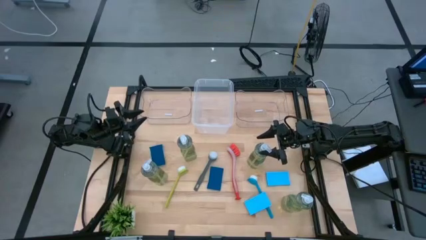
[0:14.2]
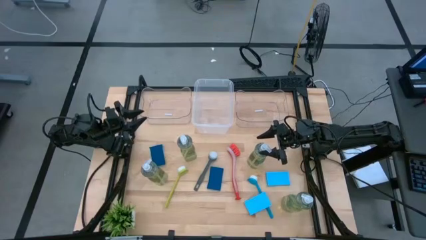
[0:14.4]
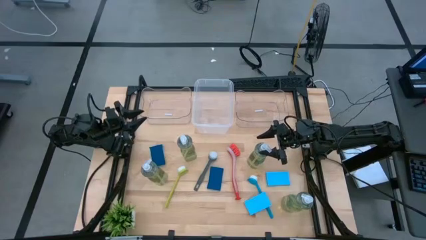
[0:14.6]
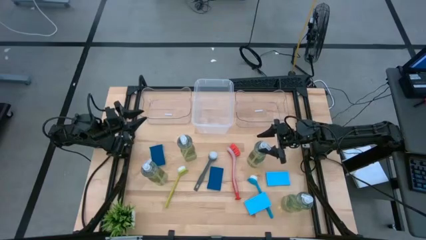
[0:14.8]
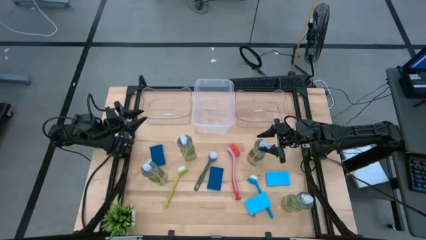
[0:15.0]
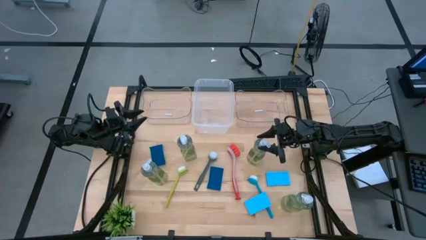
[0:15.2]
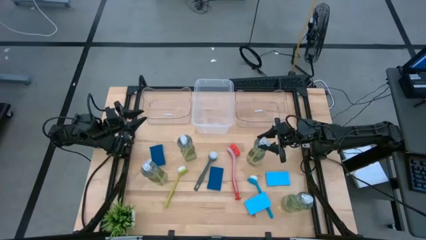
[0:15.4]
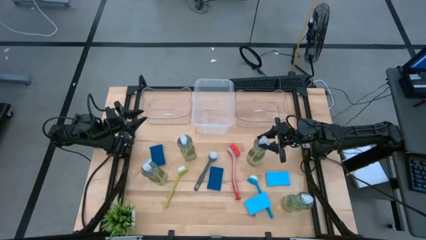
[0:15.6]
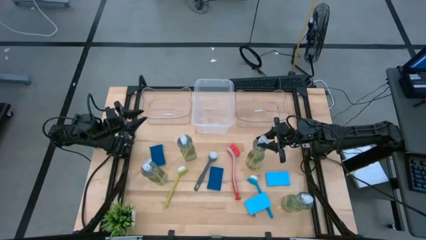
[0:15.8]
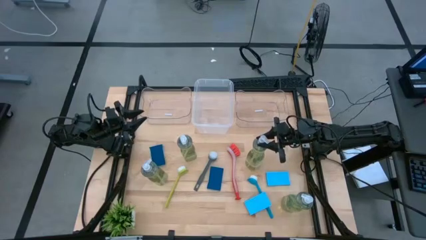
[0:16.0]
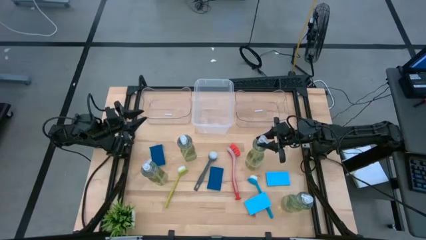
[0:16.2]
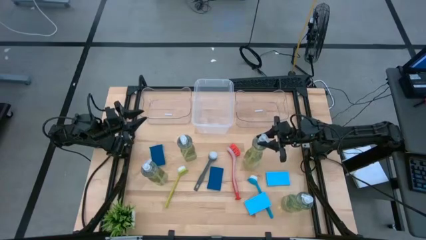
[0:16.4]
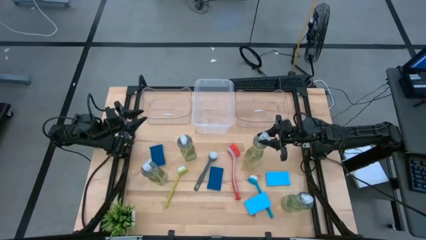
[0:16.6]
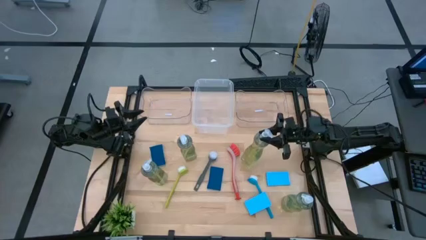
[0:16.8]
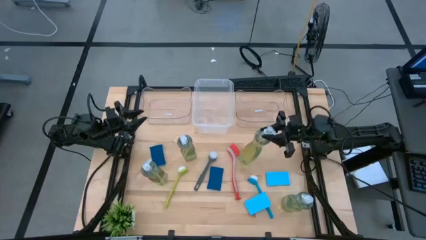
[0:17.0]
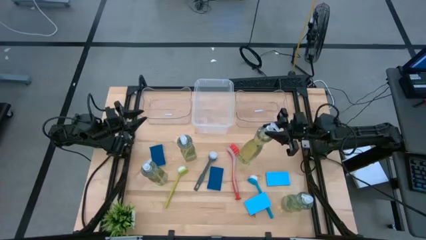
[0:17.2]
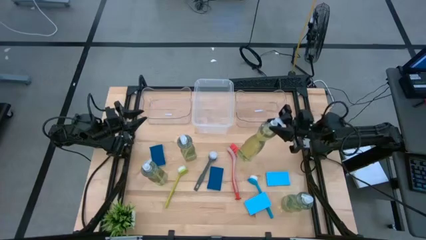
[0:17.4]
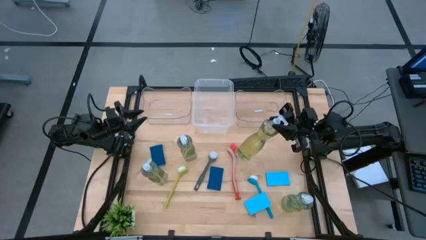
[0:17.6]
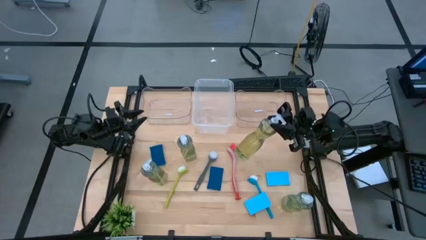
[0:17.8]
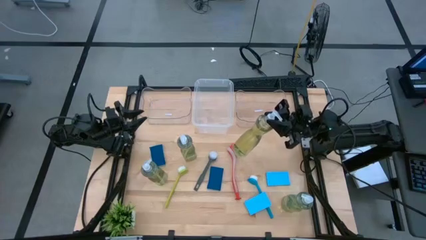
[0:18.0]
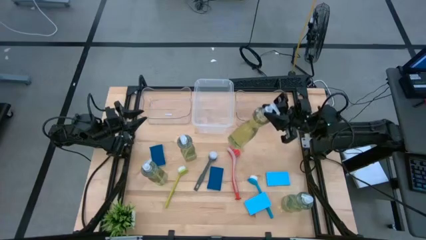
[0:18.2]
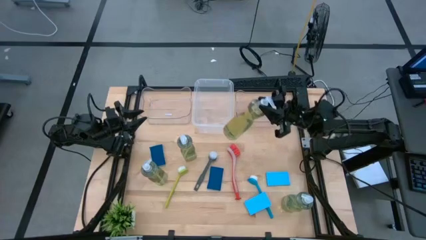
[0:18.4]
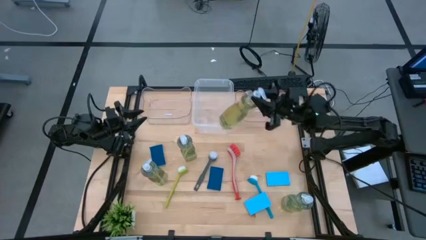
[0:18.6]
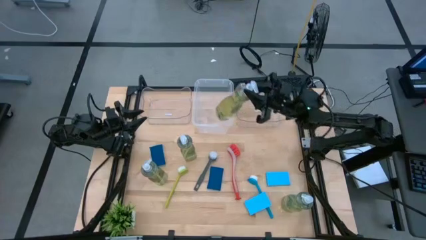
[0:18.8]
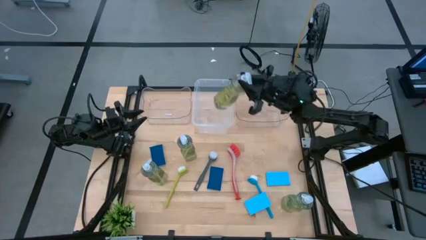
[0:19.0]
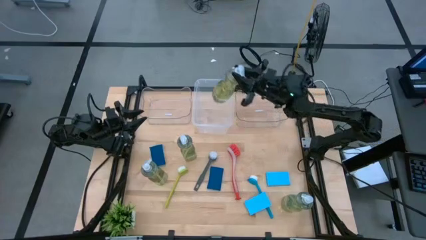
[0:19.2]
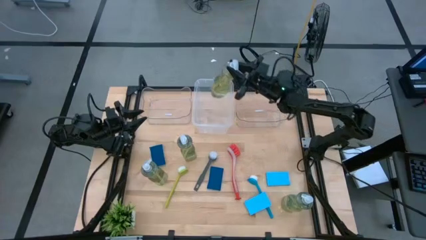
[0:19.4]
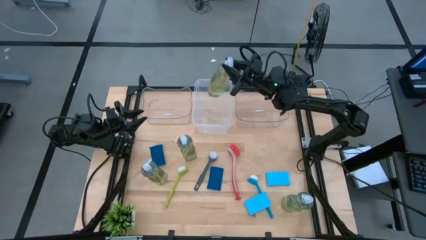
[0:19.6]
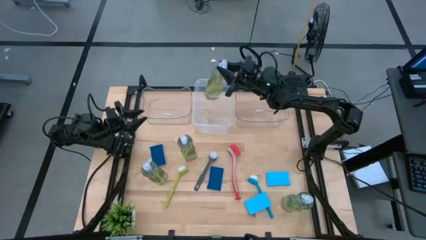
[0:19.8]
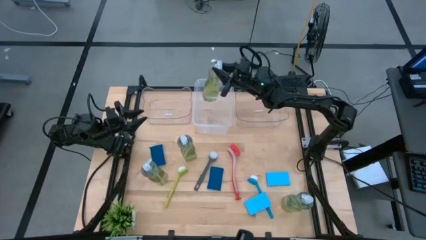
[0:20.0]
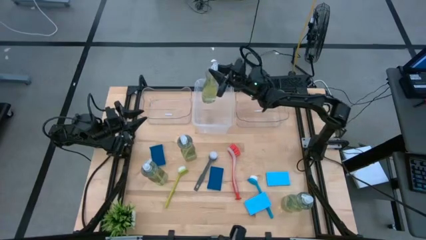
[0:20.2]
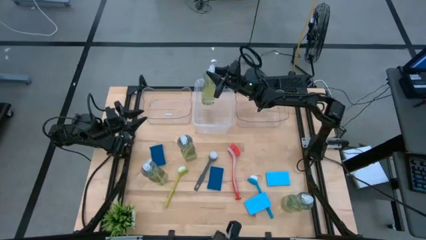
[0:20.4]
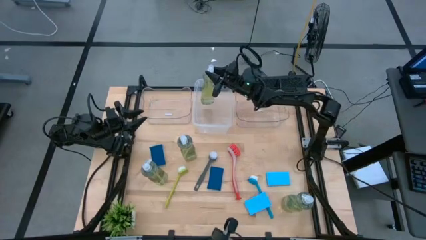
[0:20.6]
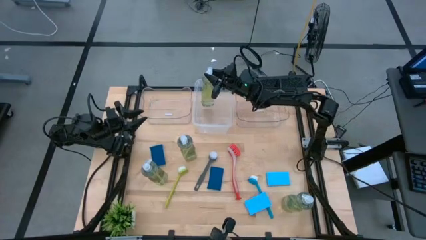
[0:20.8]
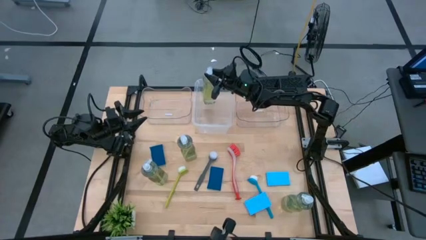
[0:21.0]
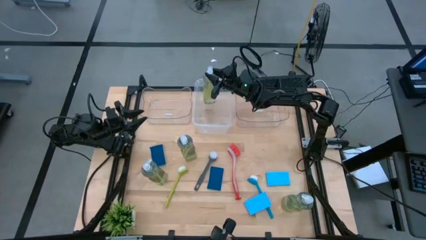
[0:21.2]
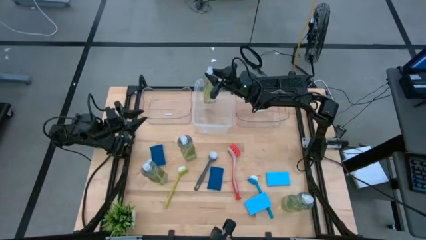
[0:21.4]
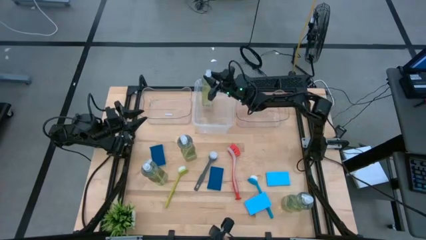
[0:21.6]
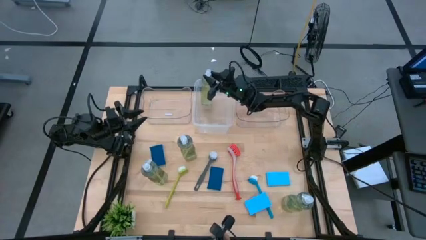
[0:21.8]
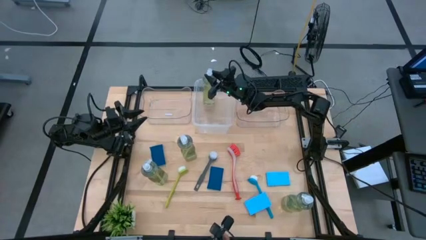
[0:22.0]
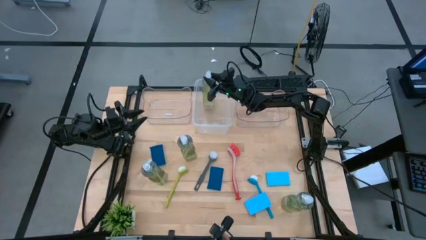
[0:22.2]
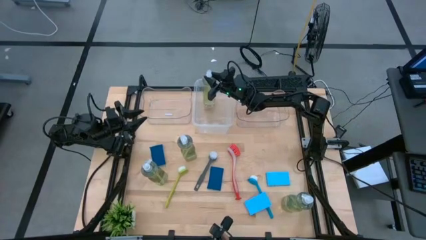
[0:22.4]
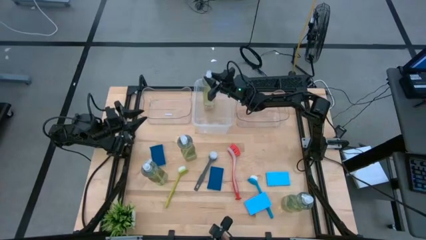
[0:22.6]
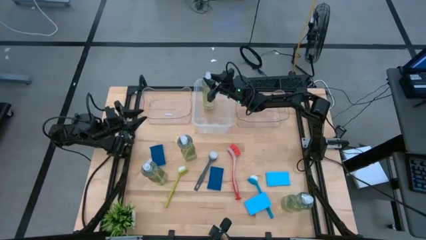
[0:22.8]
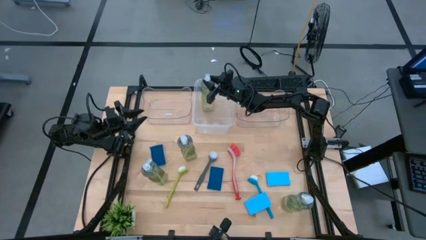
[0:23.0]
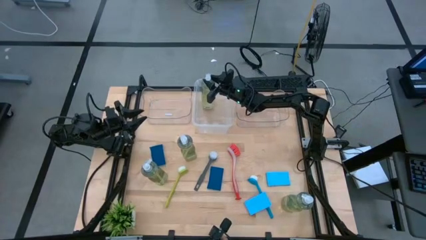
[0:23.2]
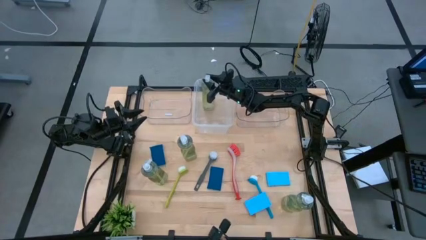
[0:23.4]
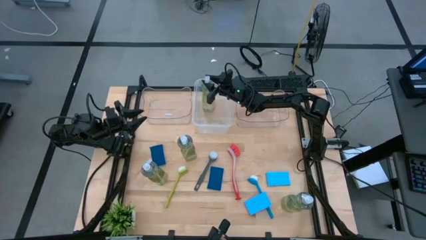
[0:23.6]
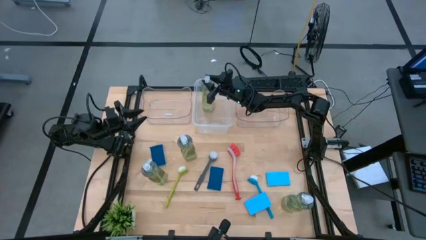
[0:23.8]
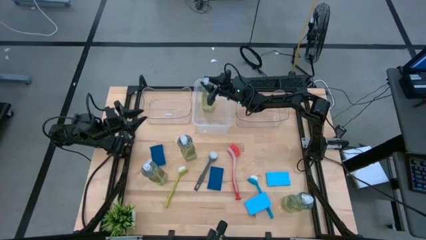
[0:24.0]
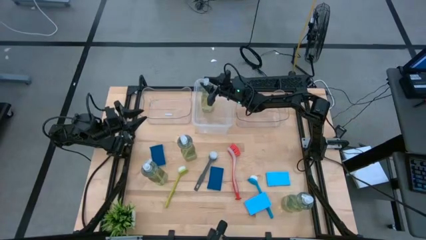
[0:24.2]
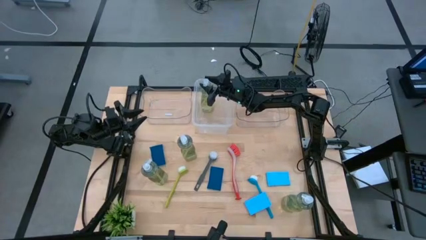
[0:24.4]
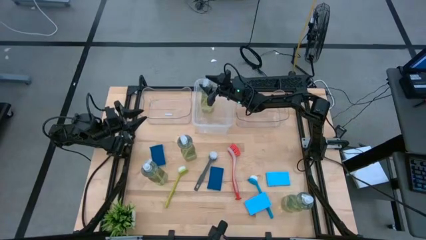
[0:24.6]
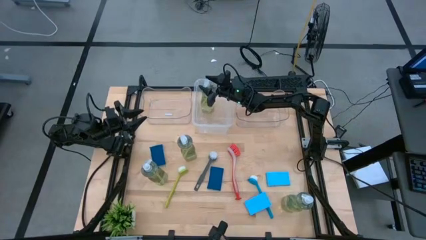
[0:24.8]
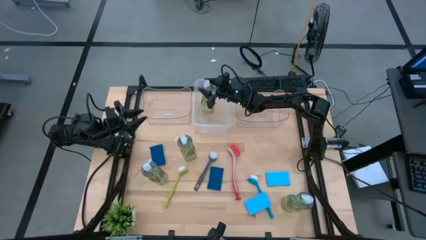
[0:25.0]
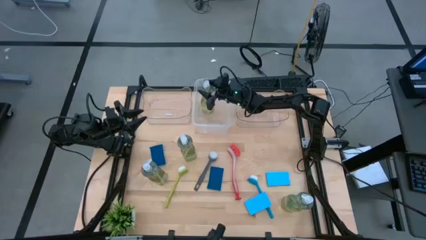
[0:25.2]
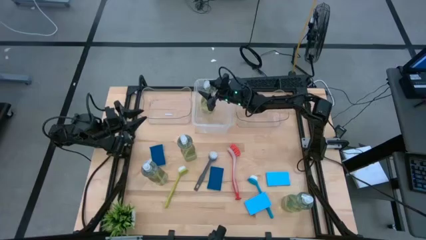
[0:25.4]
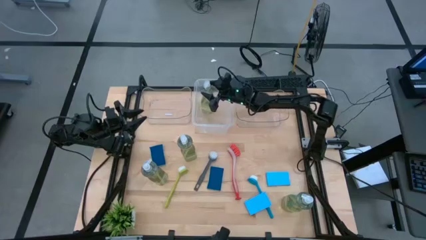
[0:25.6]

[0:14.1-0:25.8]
Task: Pick & Place Kitchen Sink Supplies
Put the green soap dispenser into the white transparent bin

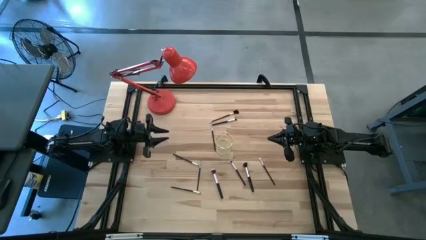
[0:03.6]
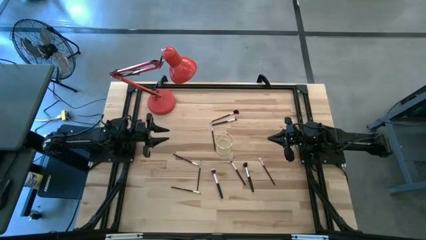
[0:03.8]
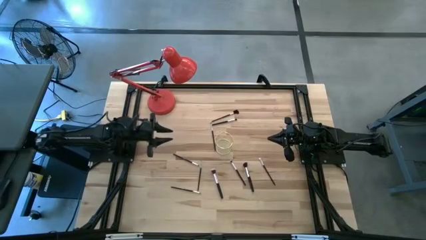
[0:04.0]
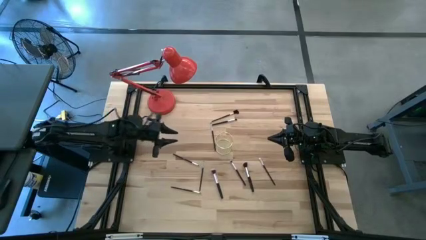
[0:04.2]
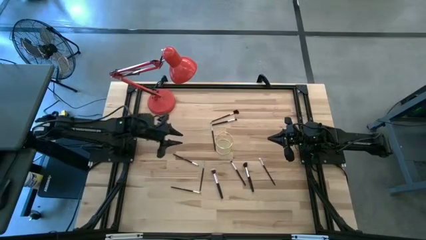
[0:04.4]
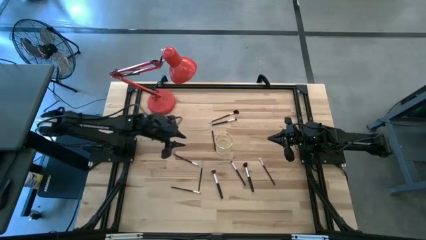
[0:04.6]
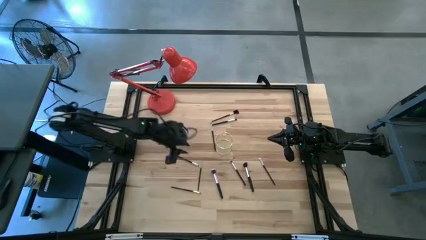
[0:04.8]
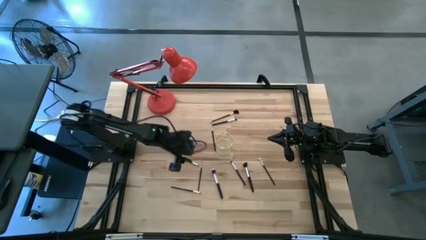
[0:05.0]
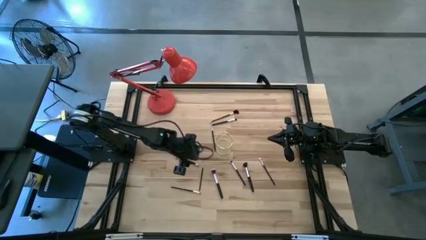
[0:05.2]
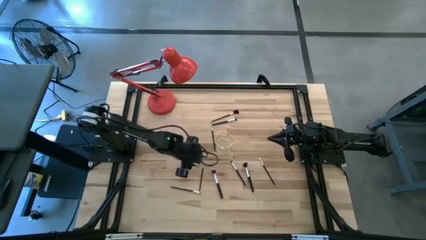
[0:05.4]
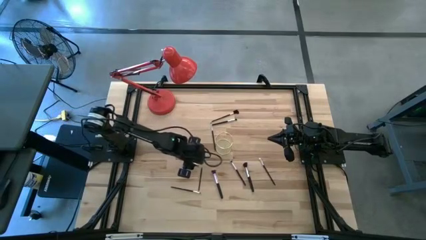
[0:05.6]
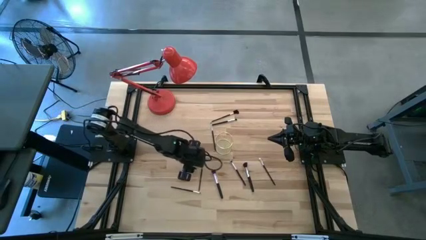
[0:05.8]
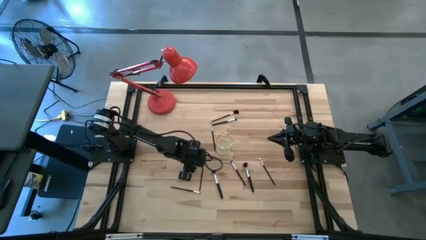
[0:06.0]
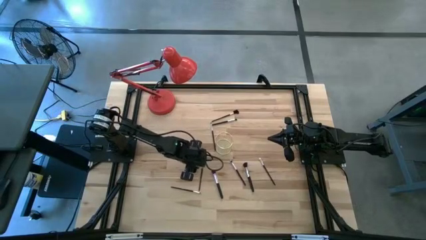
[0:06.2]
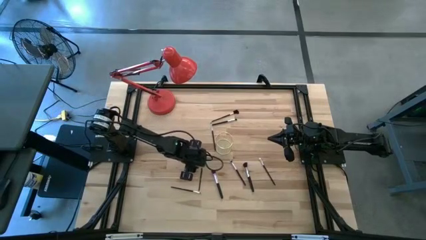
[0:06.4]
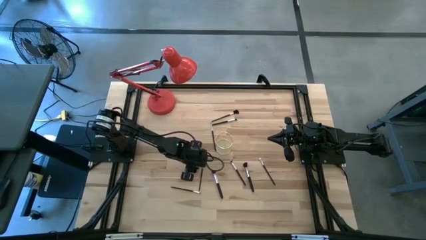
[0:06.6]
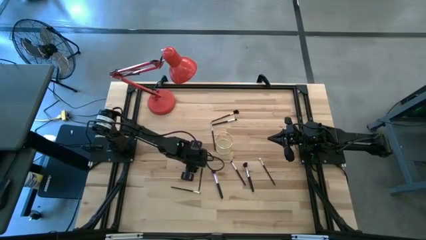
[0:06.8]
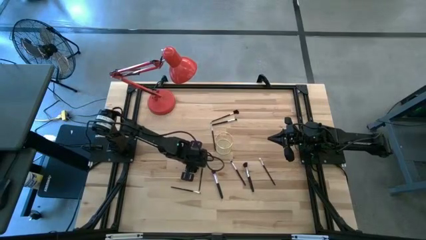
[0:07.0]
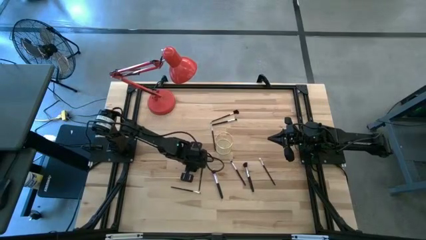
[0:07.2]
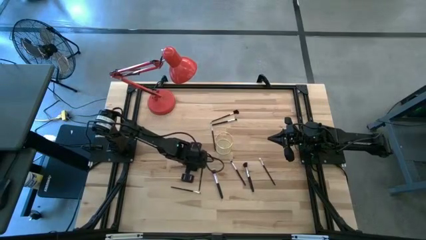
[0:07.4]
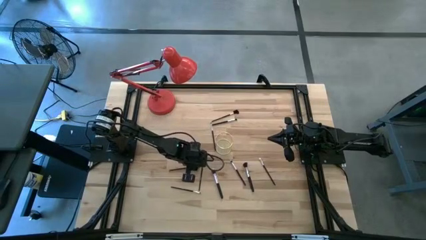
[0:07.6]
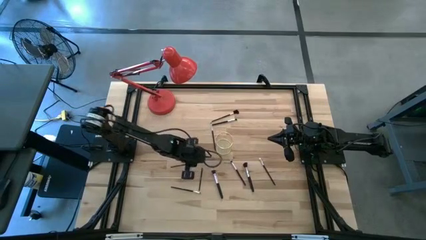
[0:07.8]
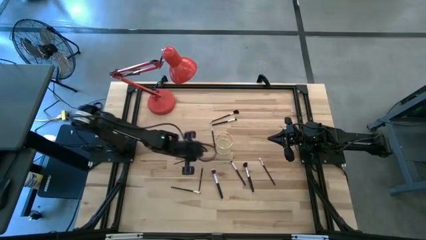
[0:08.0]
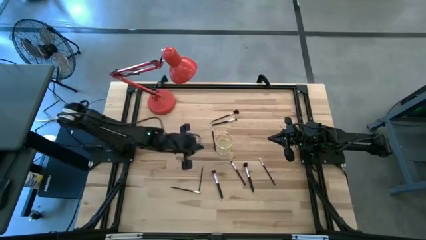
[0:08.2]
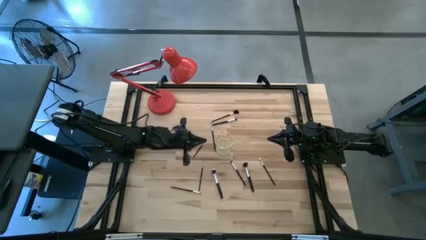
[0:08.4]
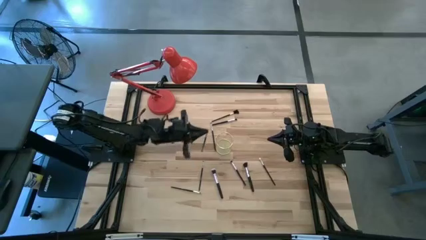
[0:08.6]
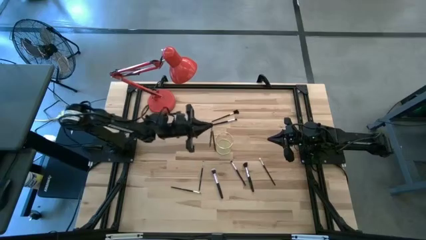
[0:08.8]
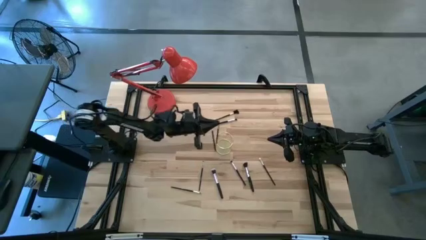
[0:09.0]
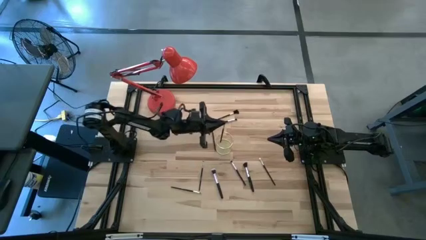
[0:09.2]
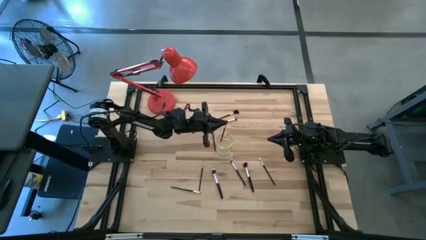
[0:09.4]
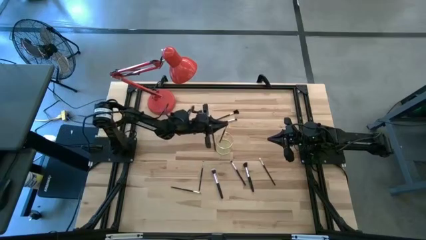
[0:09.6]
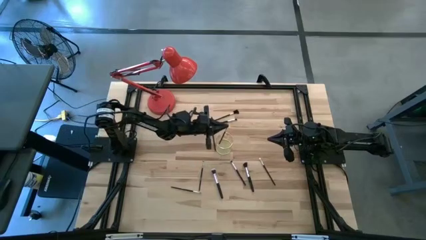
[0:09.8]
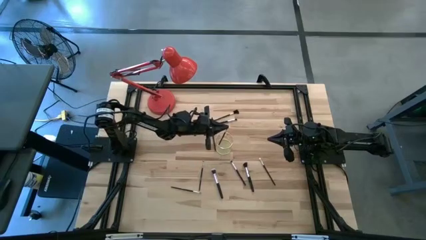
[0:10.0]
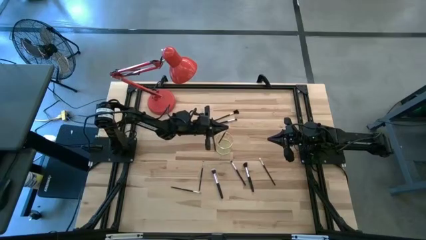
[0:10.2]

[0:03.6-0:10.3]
Task: Put items in baskets/containers
Put the eyeshadow brush into the wire organizer
